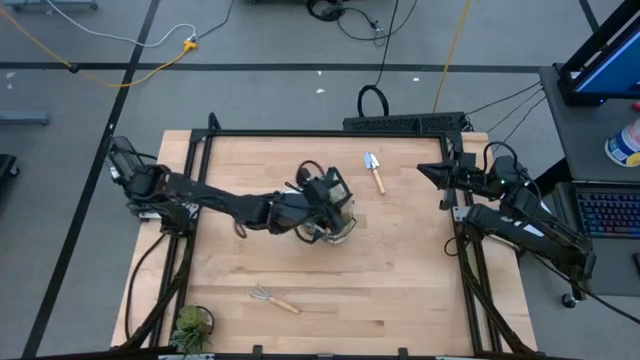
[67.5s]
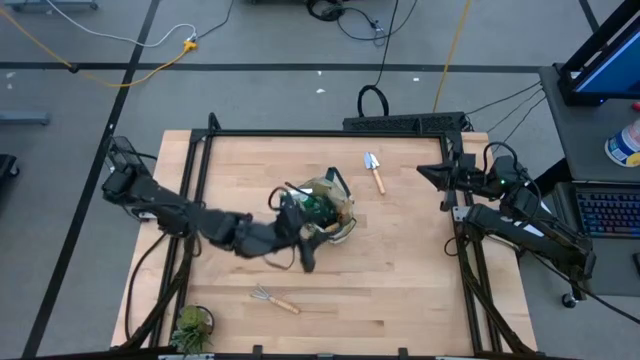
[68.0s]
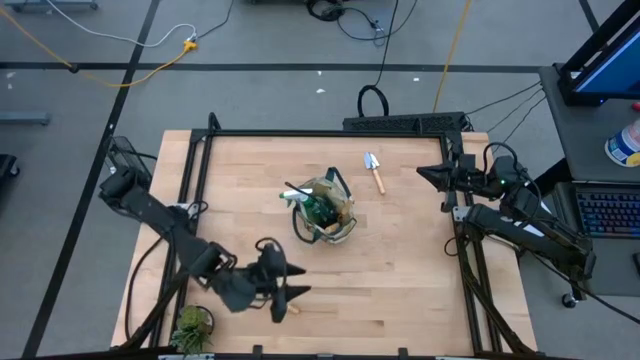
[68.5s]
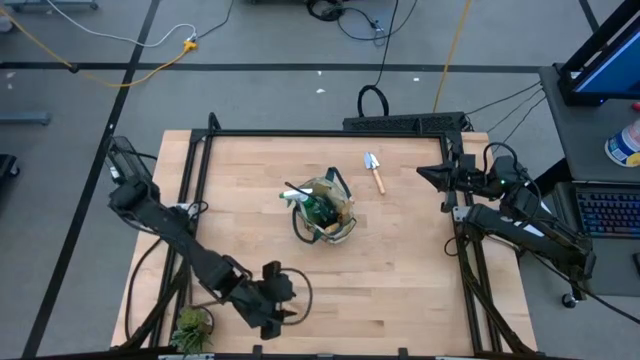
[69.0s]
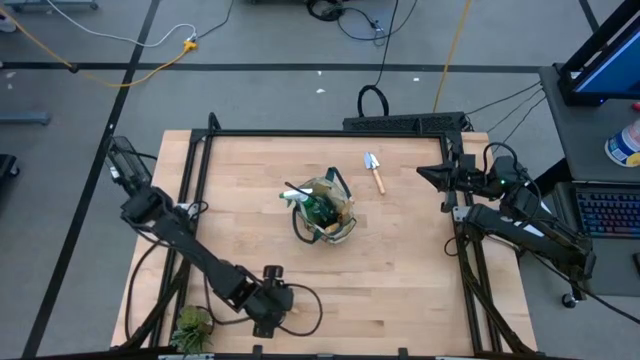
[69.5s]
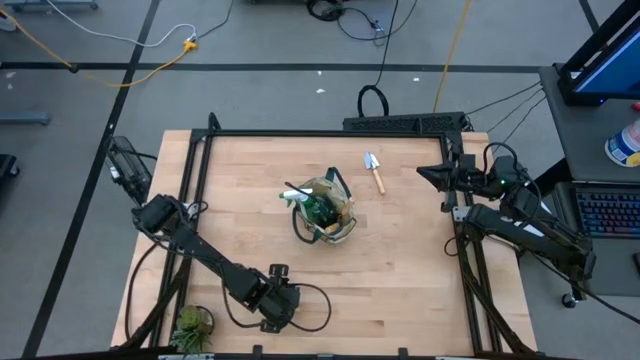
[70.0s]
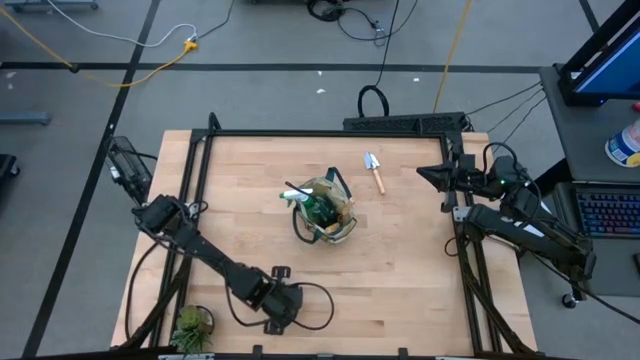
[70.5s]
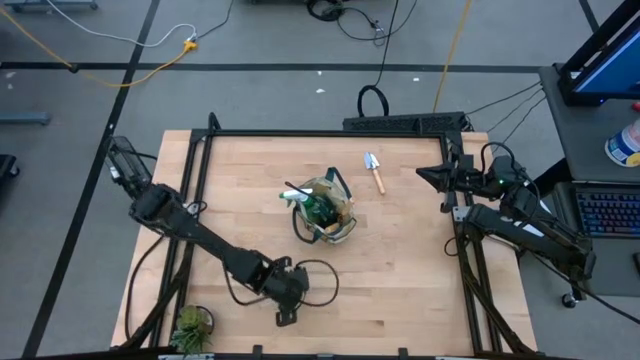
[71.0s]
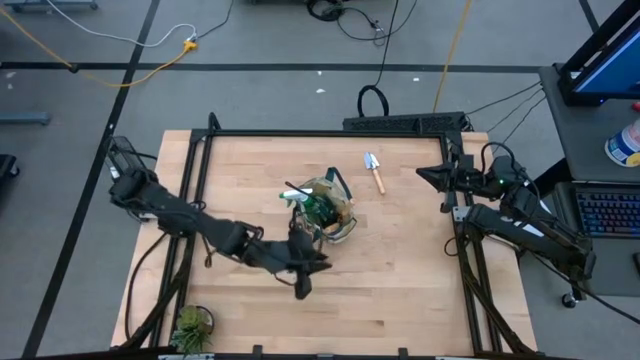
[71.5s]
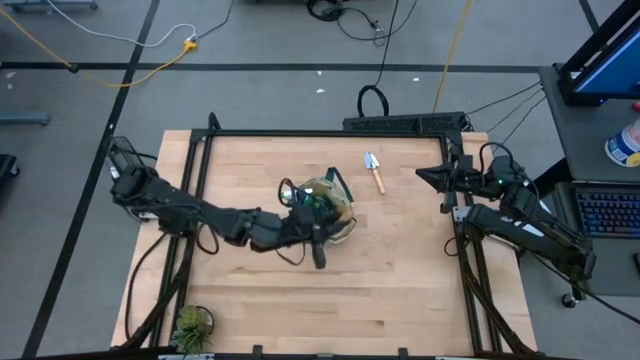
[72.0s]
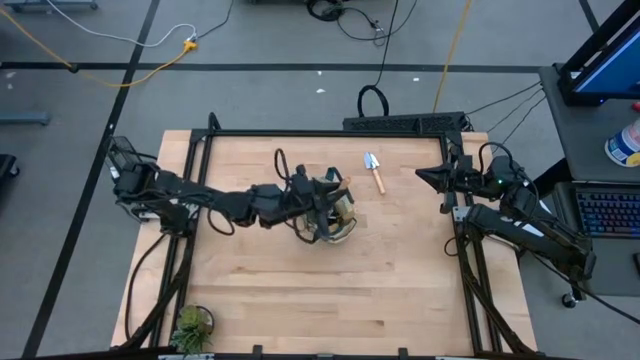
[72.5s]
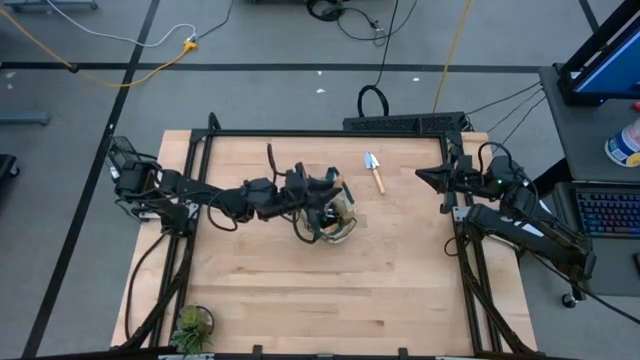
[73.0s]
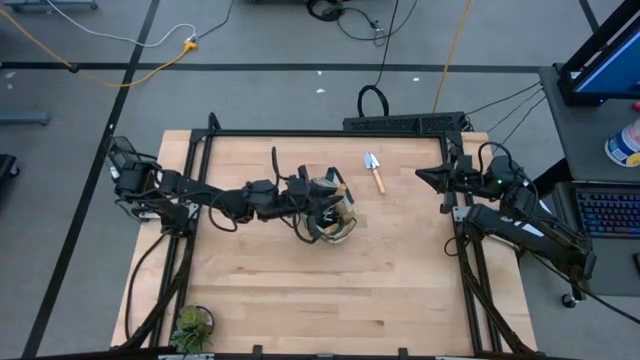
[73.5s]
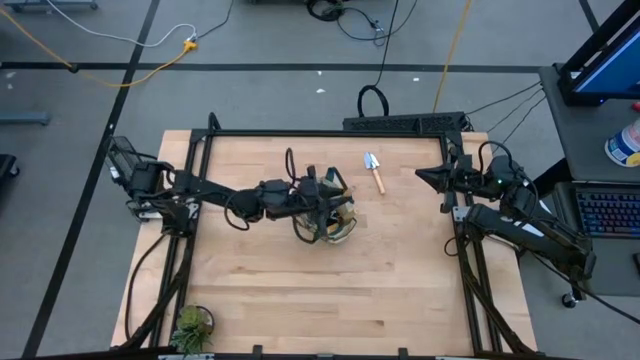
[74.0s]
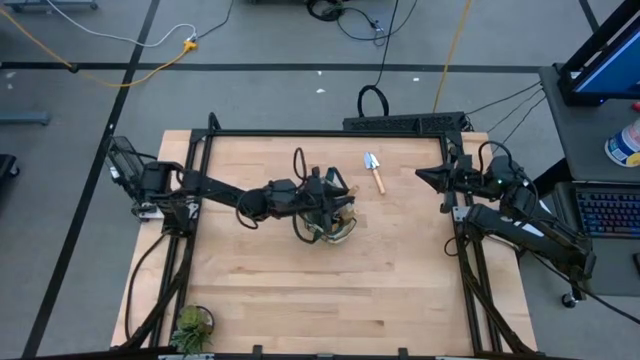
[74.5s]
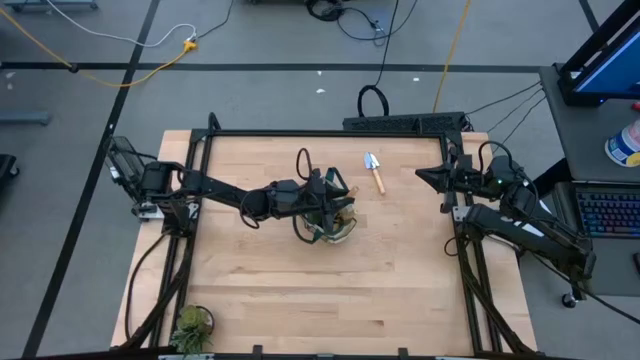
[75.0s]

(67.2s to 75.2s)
Task: Pick & Place Garden tools in Gardening bag
Put the hand rake into the gardening bag

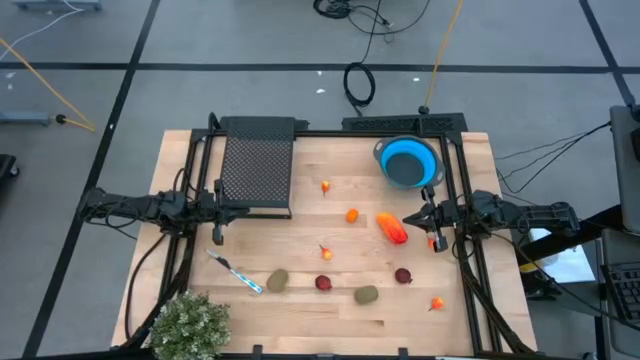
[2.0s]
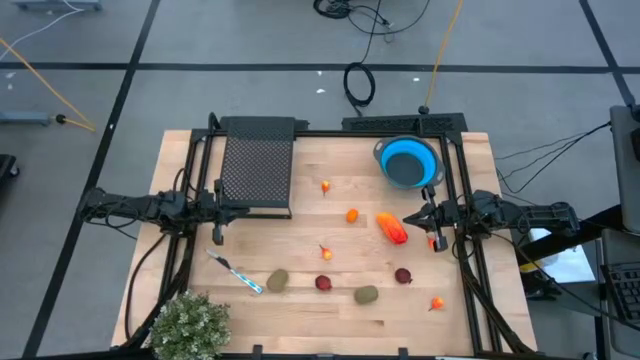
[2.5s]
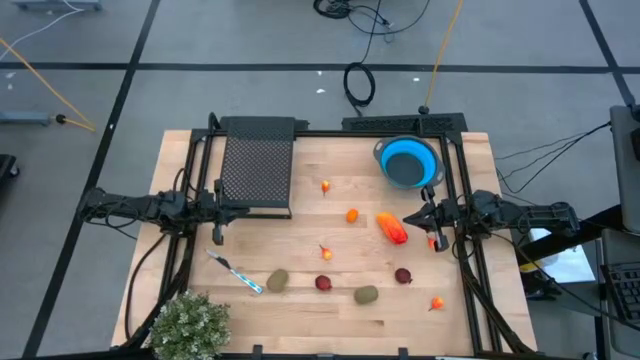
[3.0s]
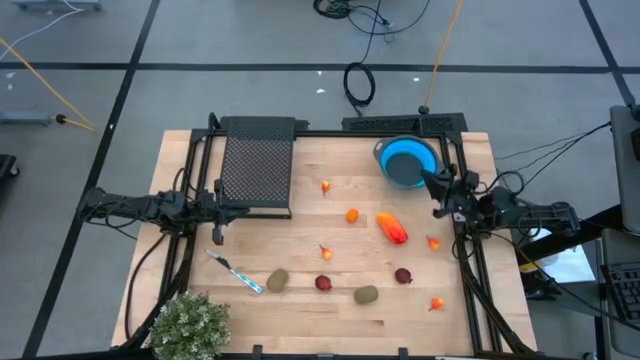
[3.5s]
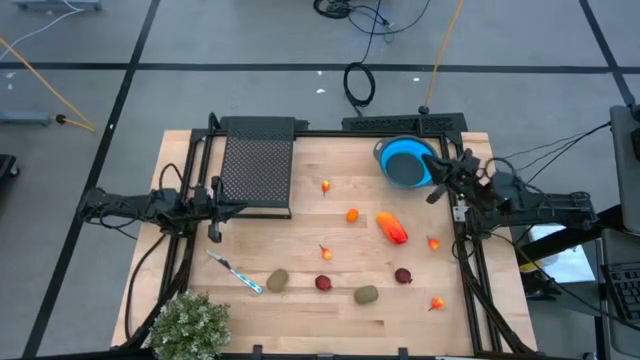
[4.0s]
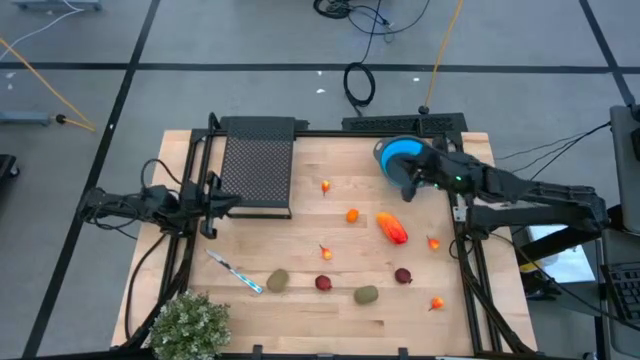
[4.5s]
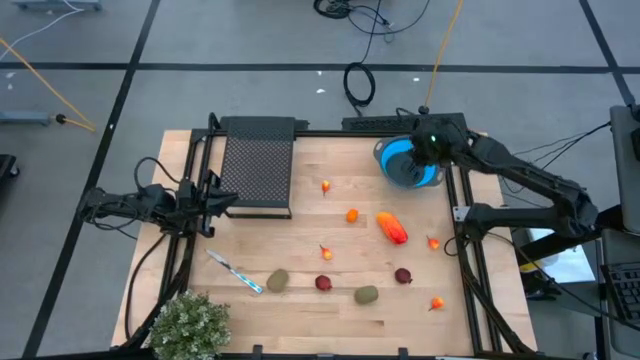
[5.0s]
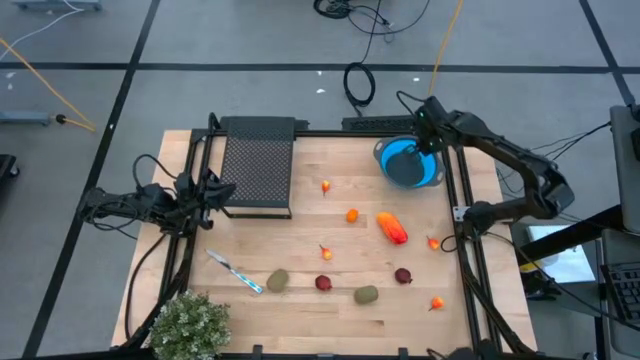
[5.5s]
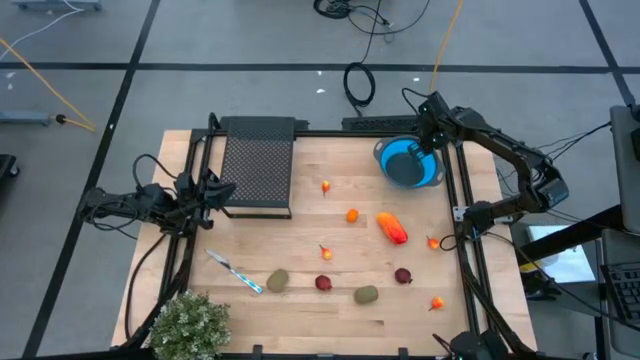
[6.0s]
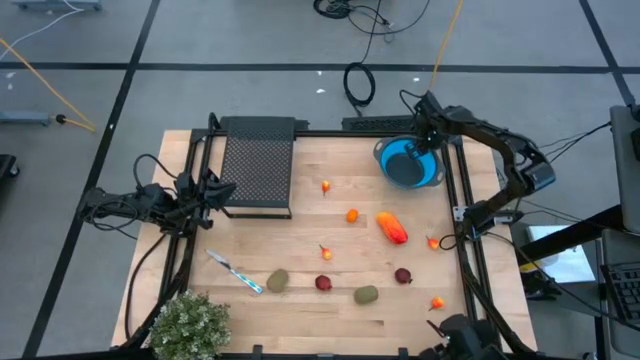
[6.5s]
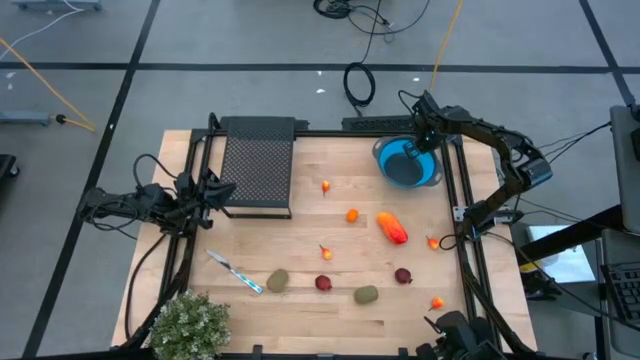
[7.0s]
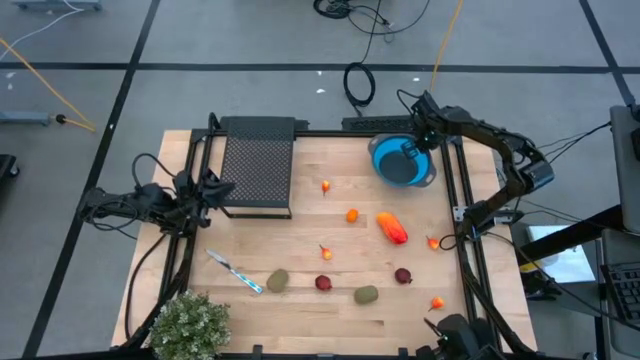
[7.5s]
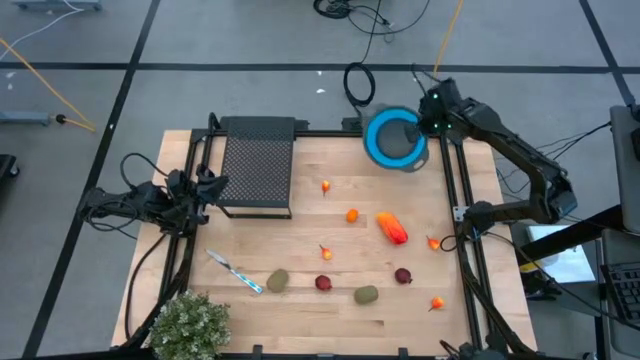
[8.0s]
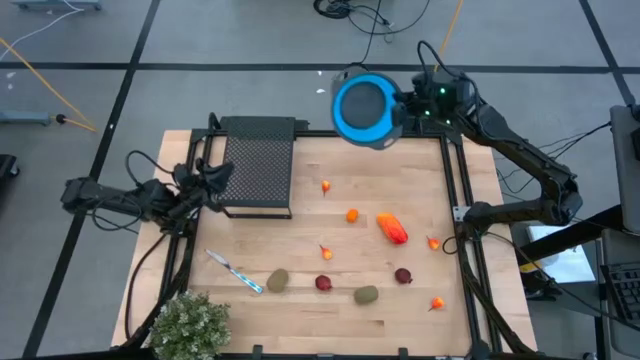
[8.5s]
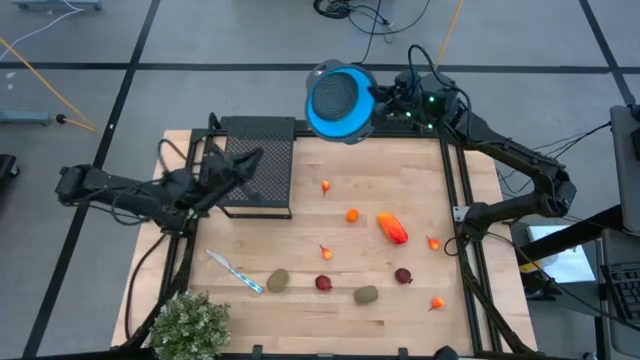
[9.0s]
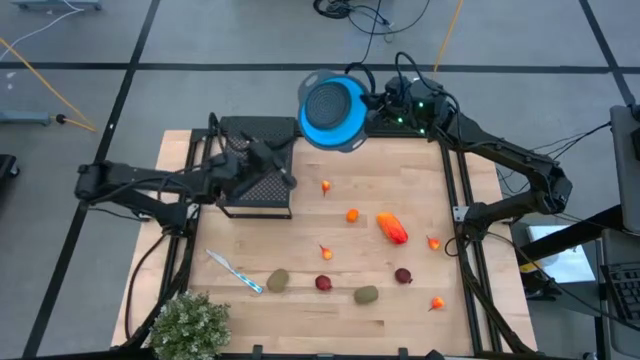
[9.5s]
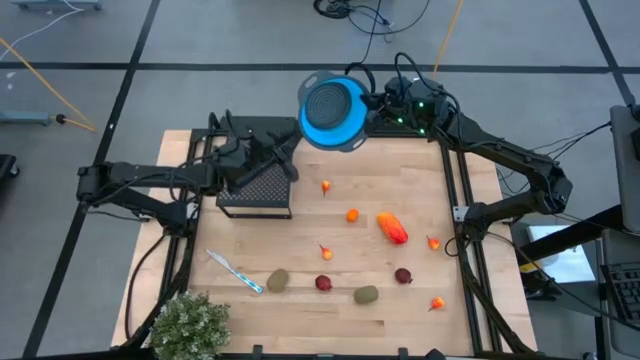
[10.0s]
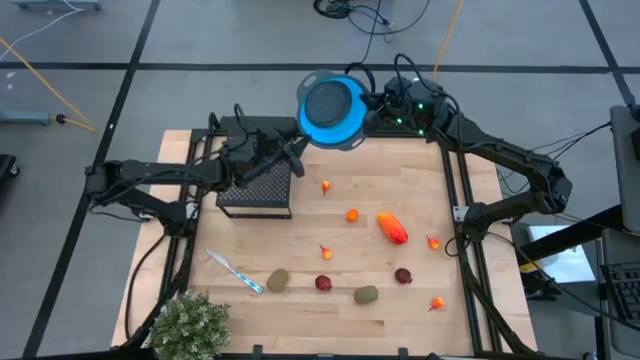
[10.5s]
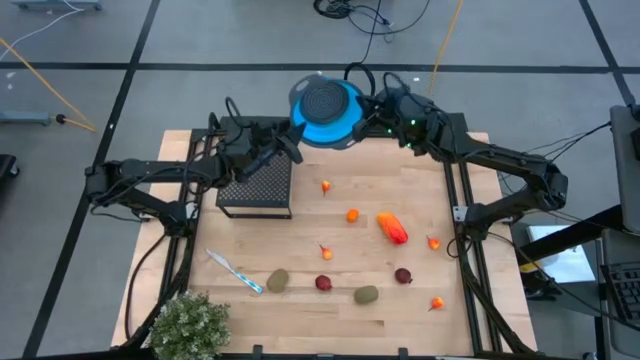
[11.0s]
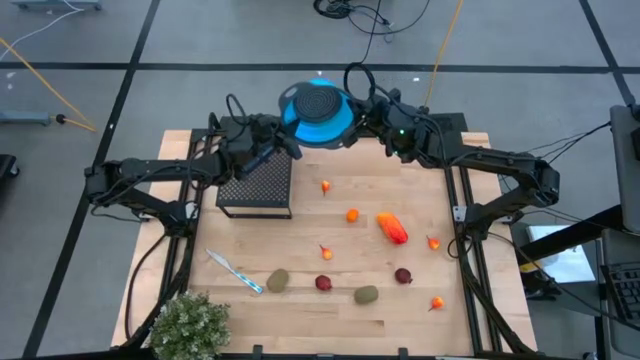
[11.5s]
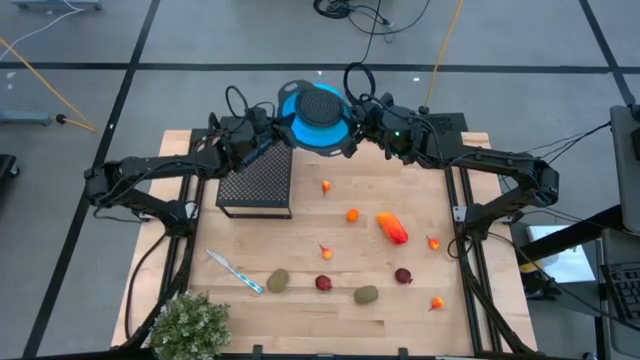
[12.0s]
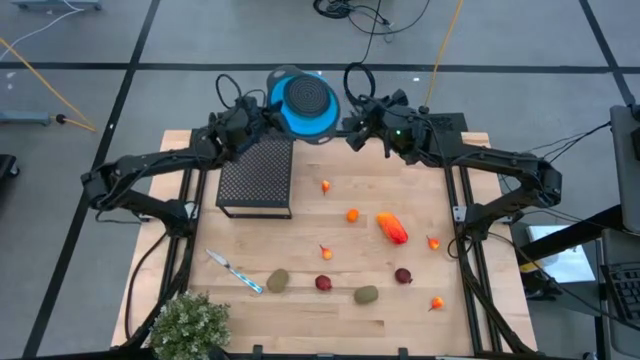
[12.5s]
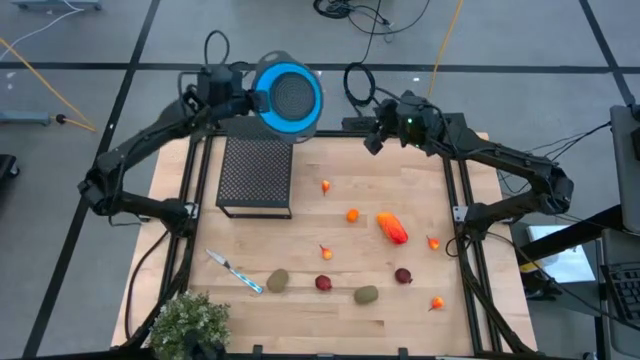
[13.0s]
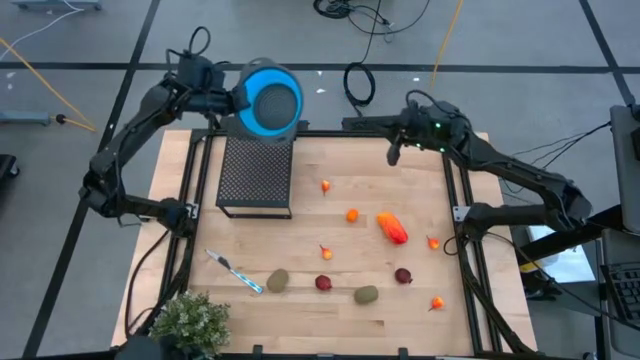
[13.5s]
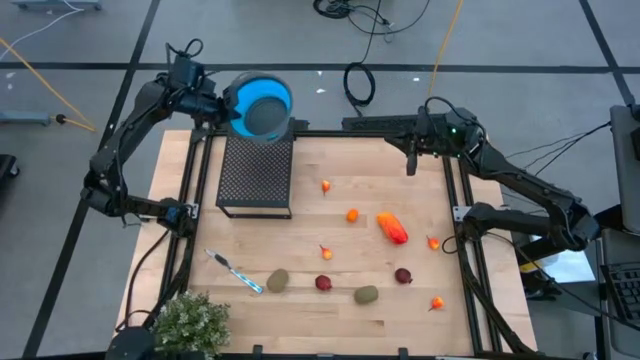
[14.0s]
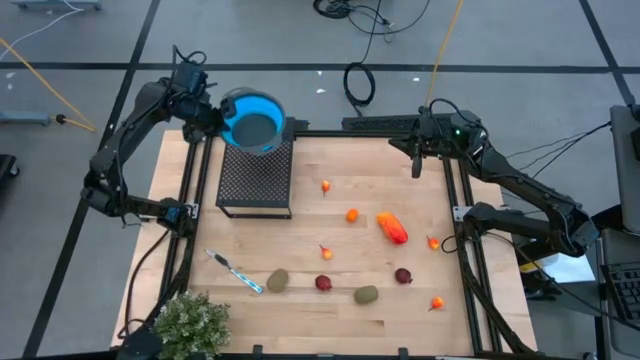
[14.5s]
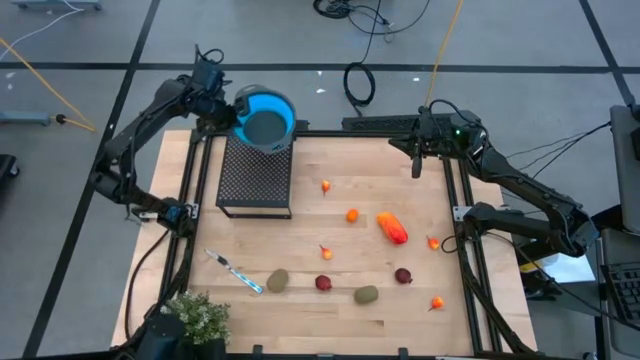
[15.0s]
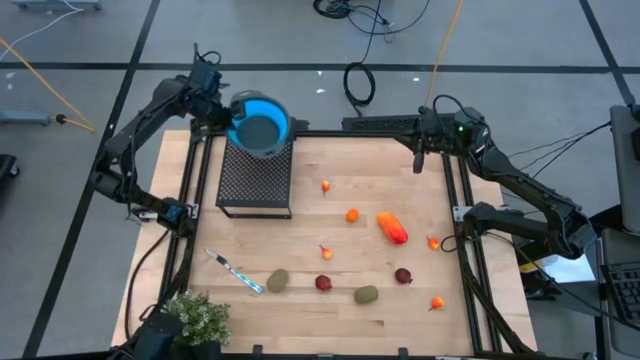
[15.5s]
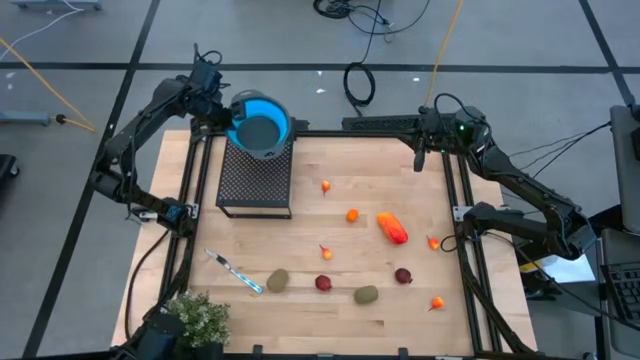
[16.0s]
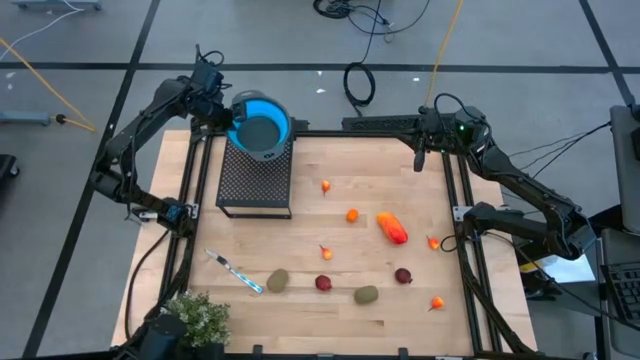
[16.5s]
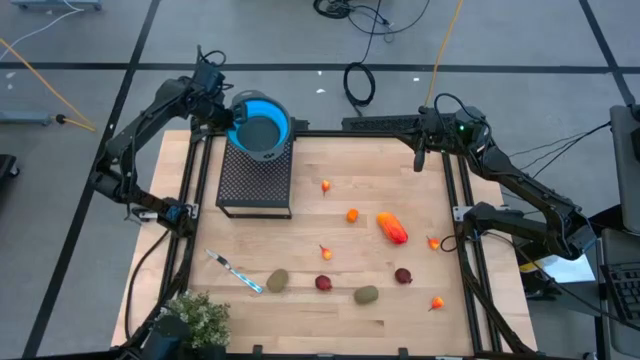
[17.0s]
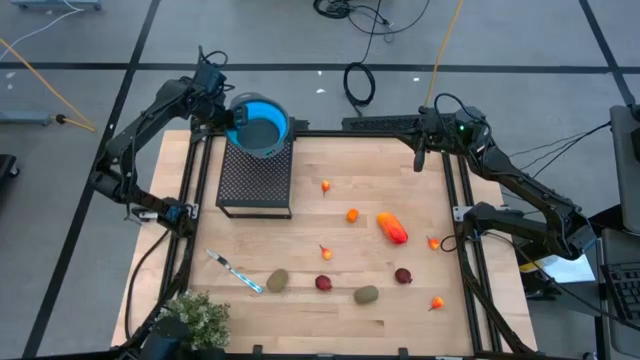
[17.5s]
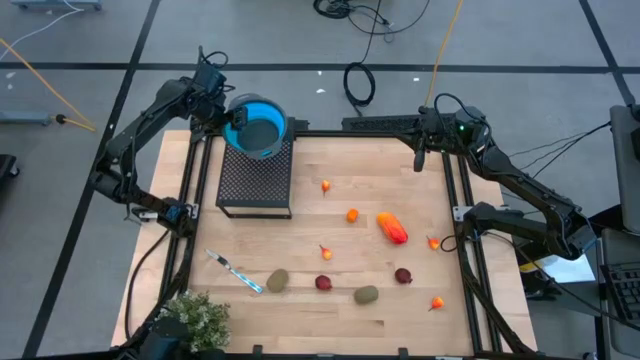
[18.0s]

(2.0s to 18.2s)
Task: Pick & Place Fruit
Put the blue strainer bowl on the shelf
